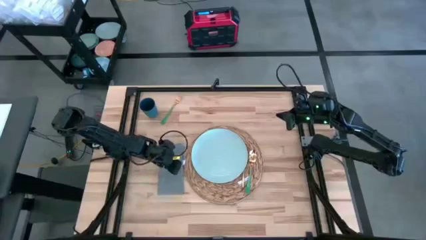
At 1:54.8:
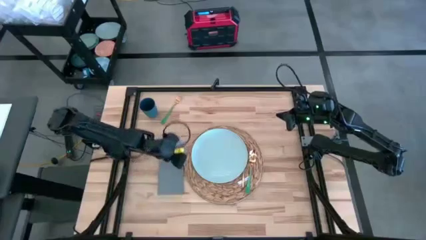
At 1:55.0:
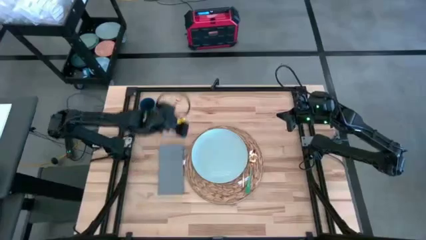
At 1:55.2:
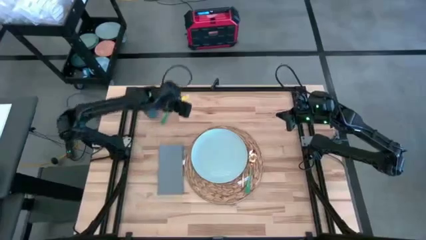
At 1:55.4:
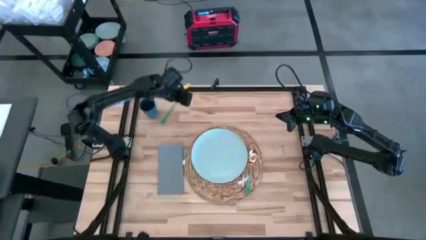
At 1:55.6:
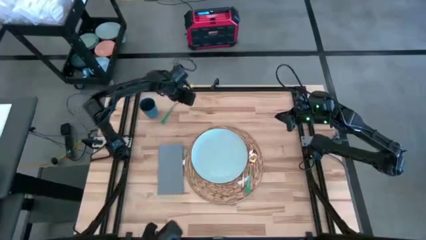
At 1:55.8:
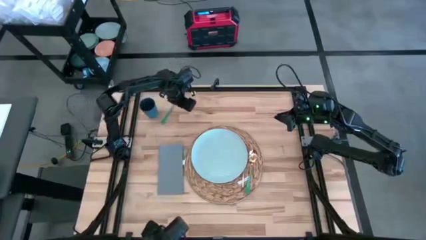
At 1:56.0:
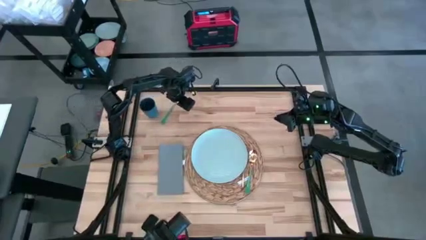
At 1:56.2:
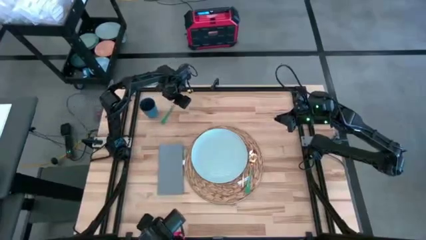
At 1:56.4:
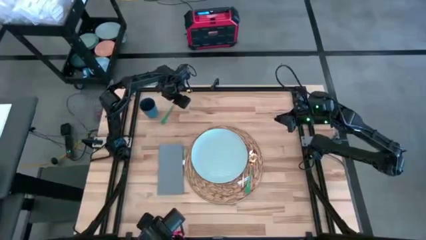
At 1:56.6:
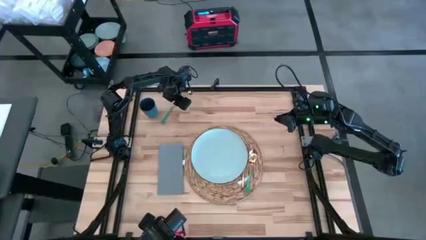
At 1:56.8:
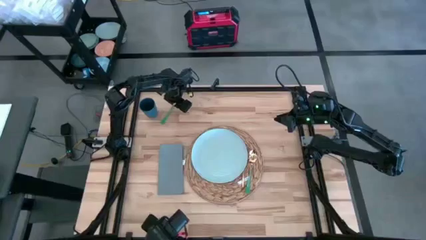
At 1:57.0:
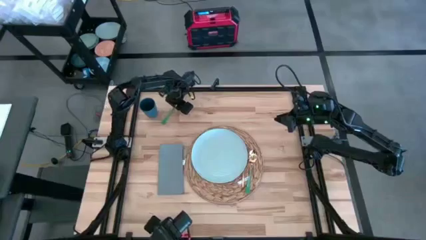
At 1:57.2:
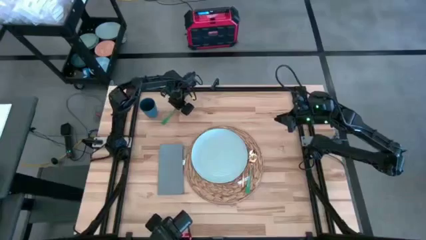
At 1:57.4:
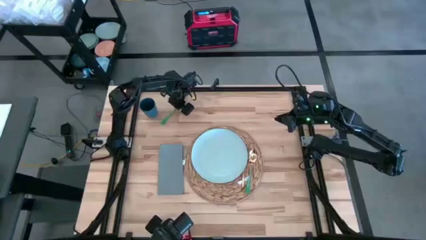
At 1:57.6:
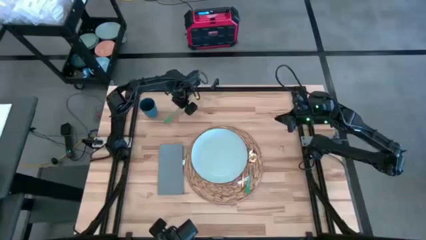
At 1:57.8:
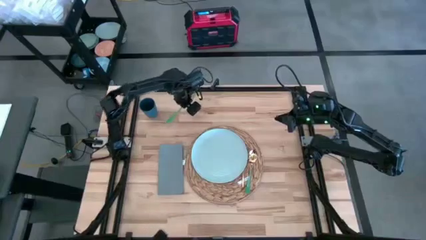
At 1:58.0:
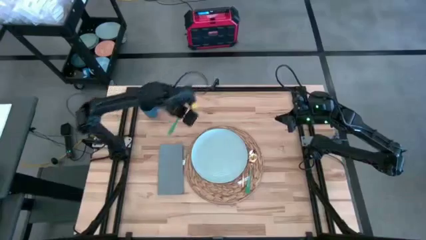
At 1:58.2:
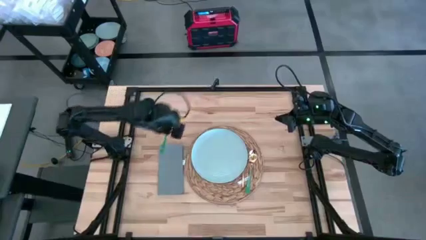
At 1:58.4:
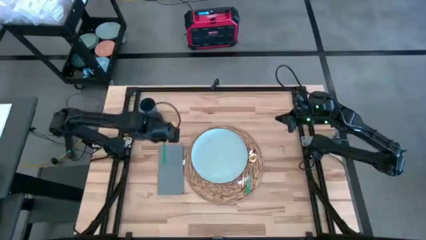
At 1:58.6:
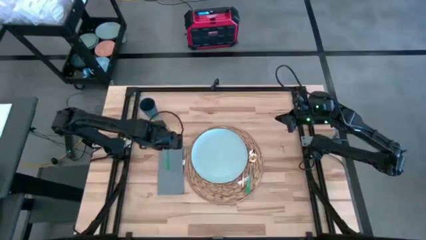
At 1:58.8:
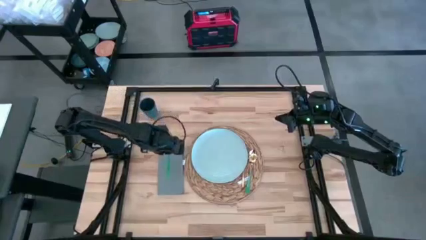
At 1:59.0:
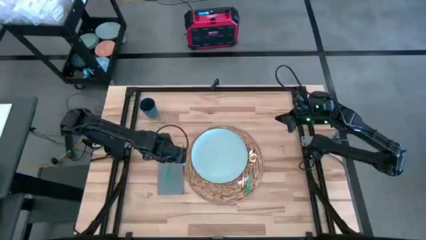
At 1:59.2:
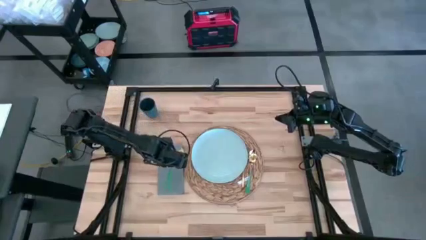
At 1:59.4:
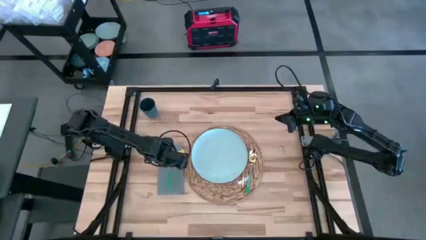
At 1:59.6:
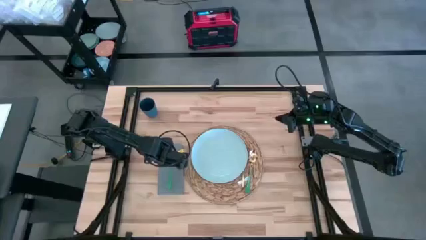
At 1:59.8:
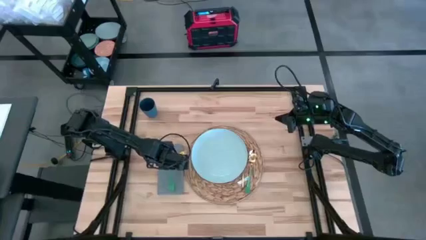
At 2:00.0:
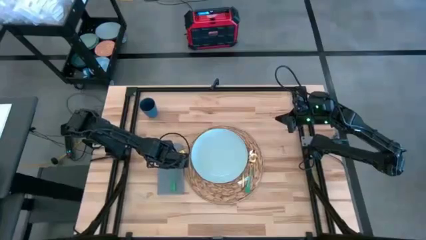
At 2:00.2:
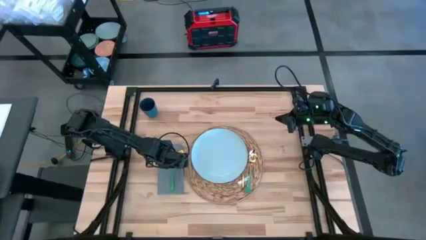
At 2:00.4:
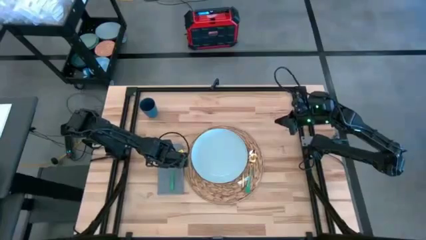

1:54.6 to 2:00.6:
Task: Set table place
Put the green fork on to gray table napkin

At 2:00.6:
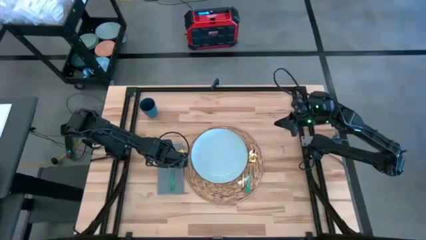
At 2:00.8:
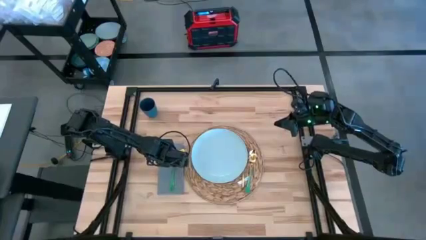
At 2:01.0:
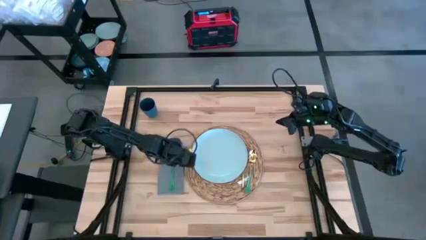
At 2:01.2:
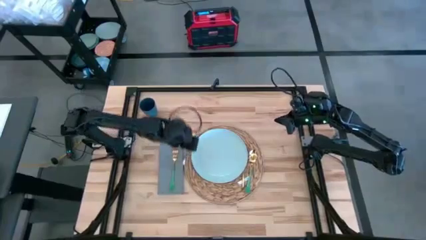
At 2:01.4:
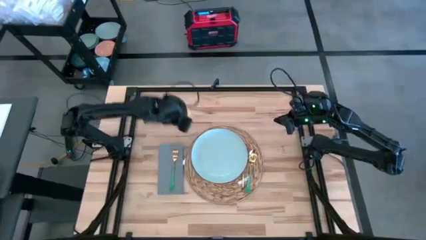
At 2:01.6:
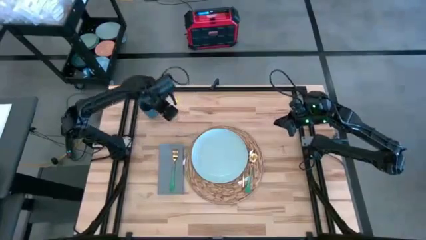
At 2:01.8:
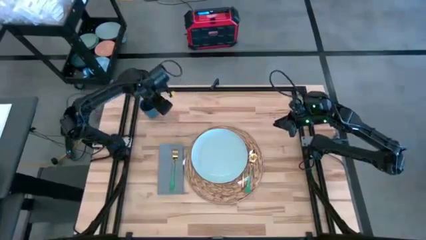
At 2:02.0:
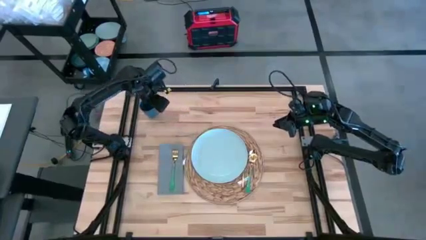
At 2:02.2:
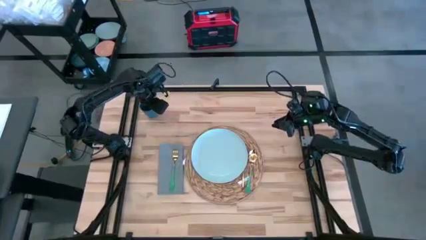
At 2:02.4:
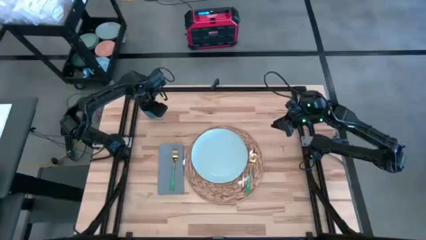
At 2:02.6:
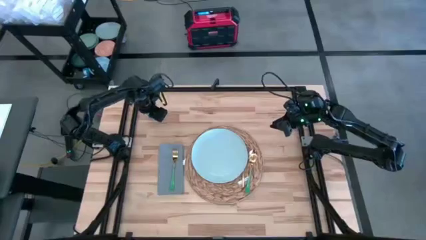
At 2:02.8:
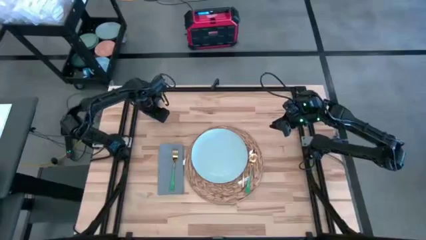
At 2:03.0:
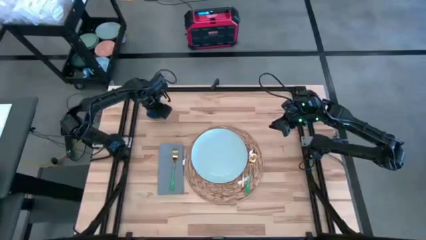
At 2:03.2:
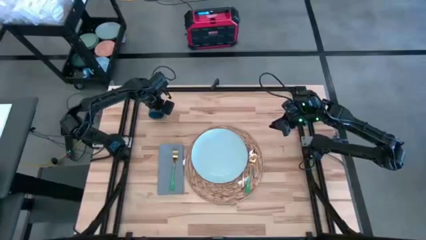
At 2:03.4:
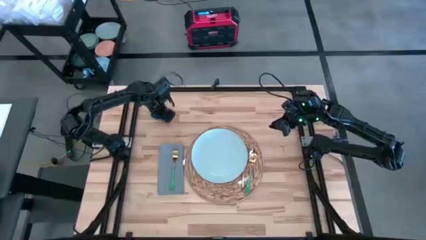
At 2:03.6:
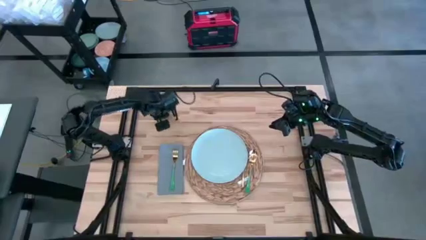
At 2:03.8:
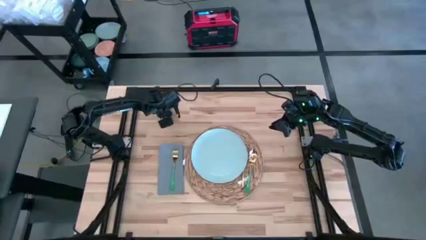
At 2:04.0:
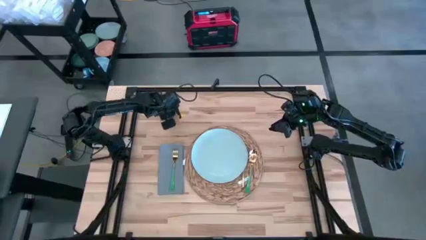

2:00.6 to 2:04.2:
Move the blue cup to the top of the brown placemat
